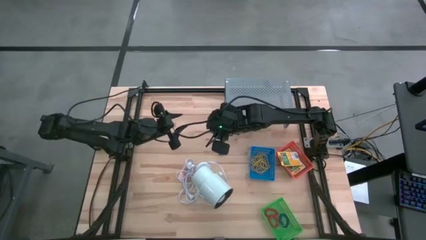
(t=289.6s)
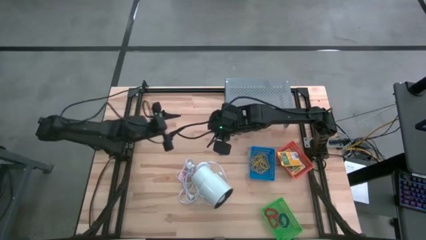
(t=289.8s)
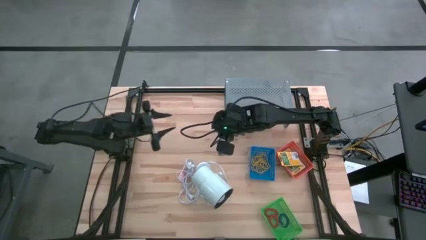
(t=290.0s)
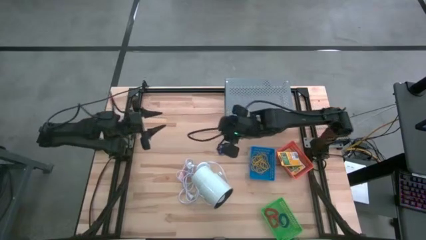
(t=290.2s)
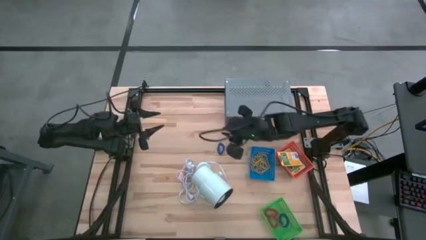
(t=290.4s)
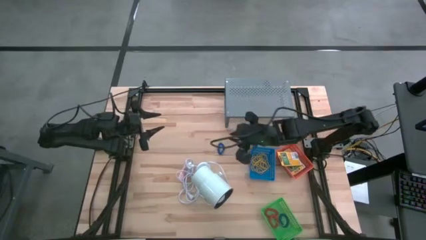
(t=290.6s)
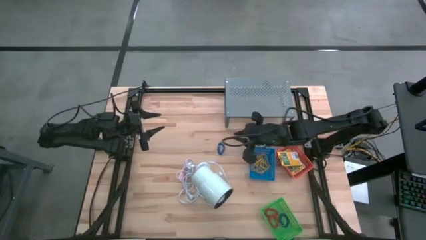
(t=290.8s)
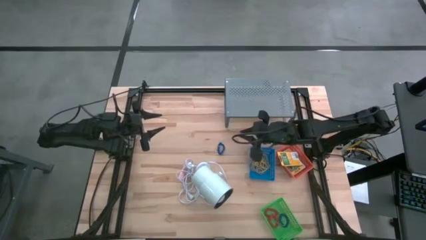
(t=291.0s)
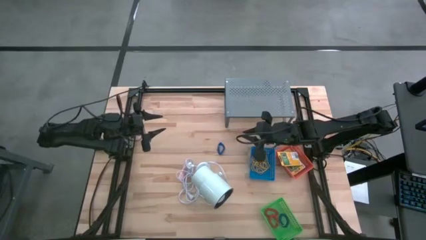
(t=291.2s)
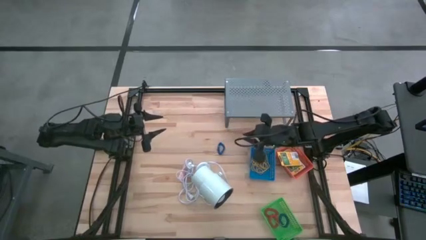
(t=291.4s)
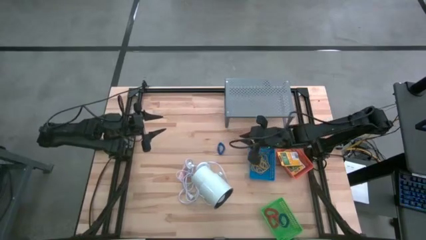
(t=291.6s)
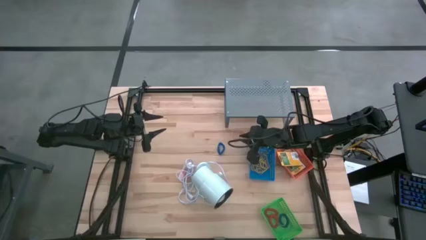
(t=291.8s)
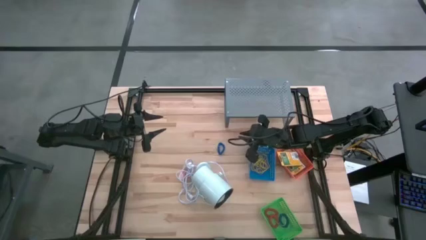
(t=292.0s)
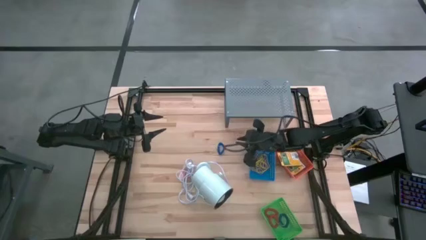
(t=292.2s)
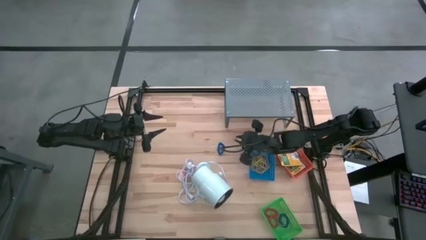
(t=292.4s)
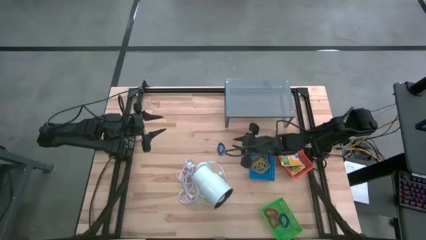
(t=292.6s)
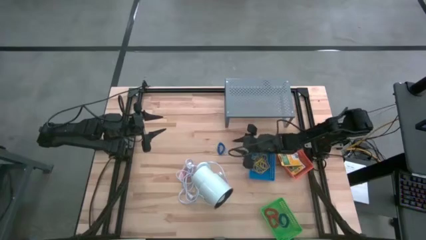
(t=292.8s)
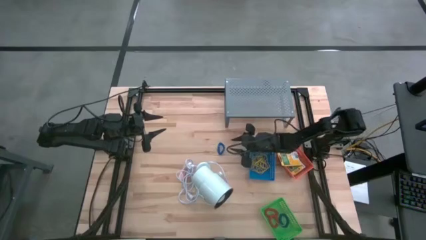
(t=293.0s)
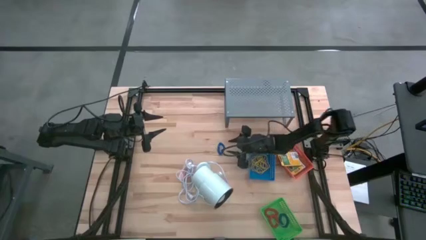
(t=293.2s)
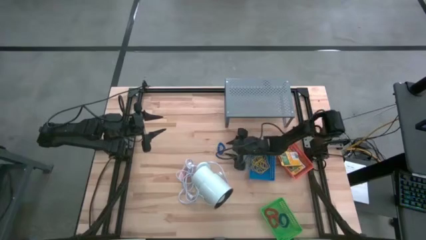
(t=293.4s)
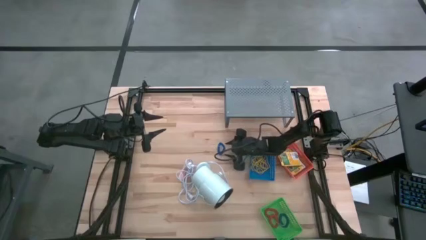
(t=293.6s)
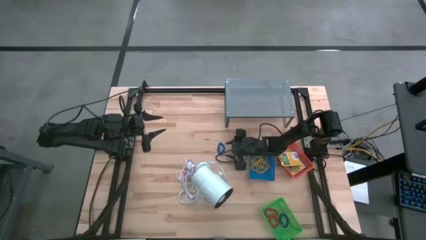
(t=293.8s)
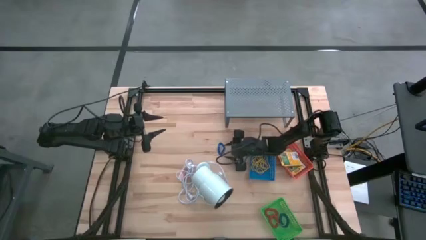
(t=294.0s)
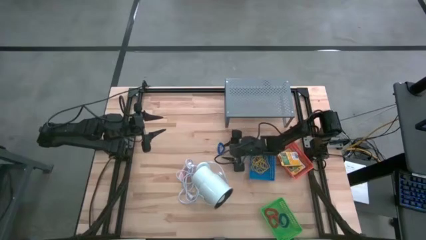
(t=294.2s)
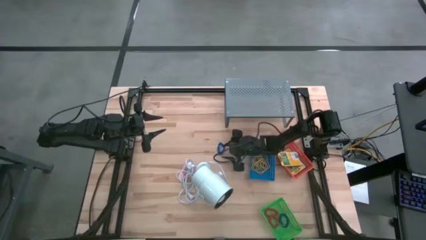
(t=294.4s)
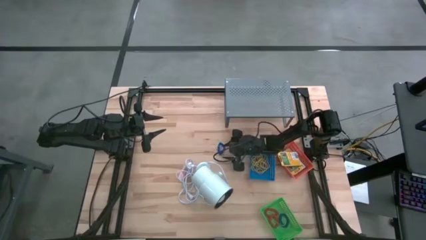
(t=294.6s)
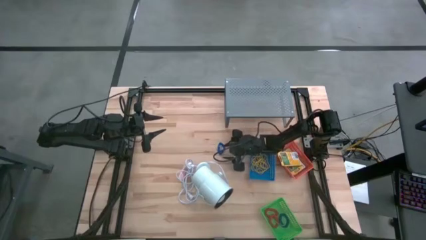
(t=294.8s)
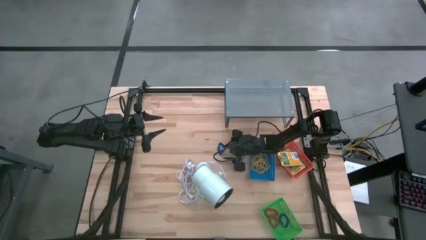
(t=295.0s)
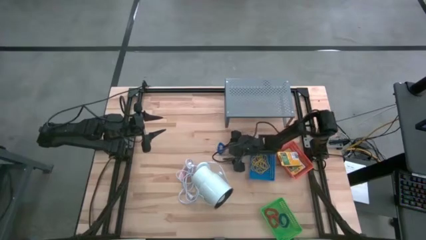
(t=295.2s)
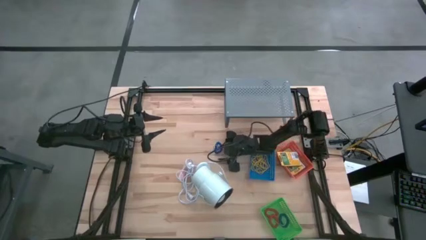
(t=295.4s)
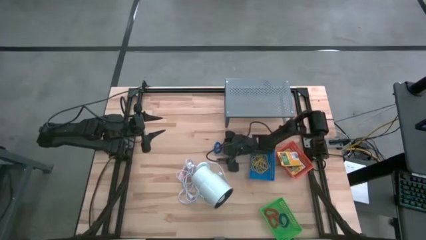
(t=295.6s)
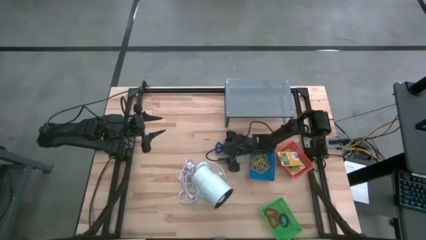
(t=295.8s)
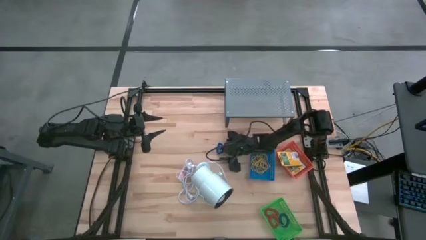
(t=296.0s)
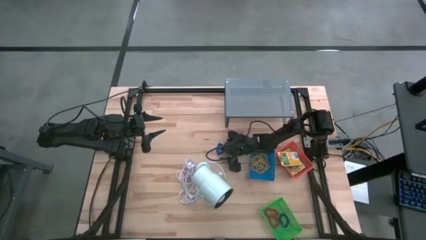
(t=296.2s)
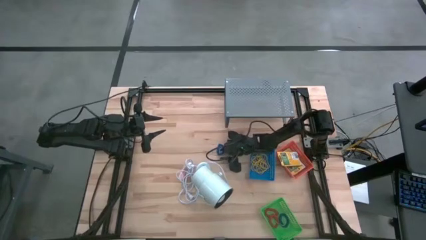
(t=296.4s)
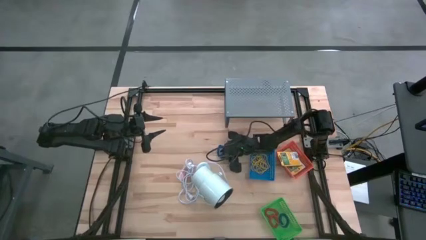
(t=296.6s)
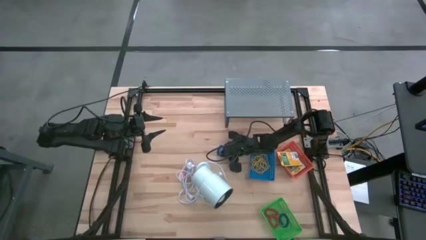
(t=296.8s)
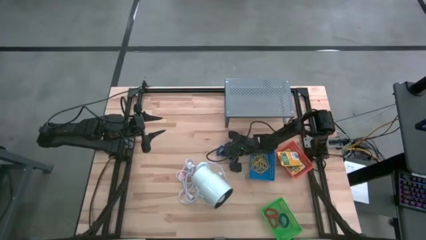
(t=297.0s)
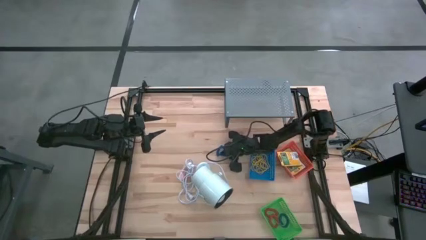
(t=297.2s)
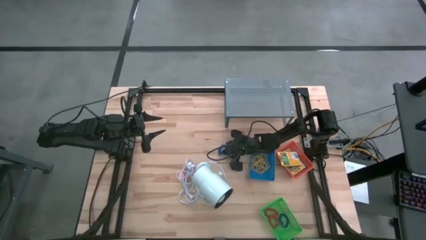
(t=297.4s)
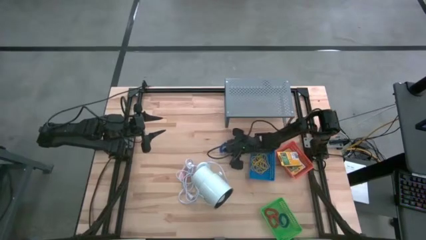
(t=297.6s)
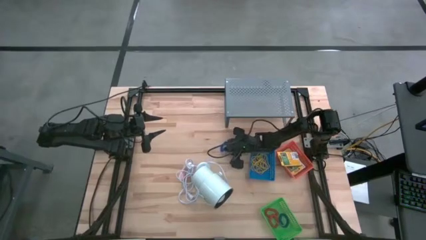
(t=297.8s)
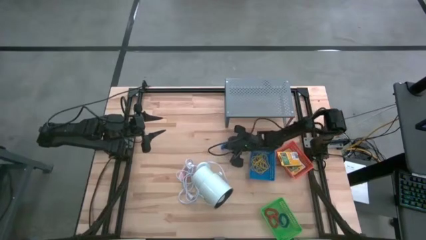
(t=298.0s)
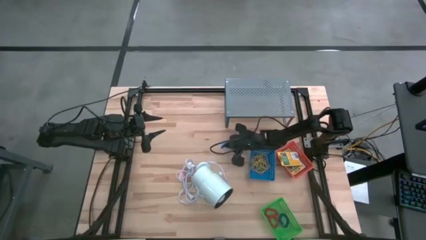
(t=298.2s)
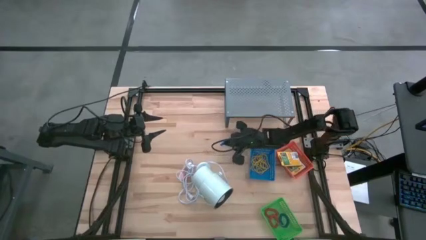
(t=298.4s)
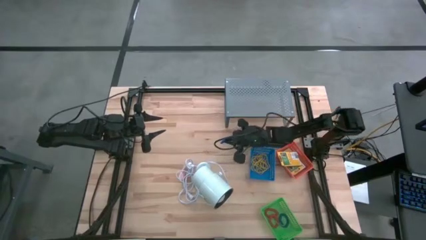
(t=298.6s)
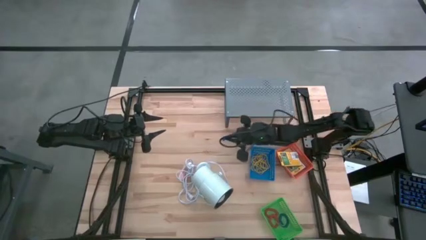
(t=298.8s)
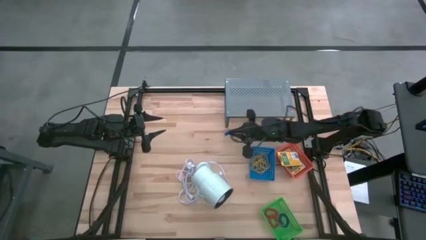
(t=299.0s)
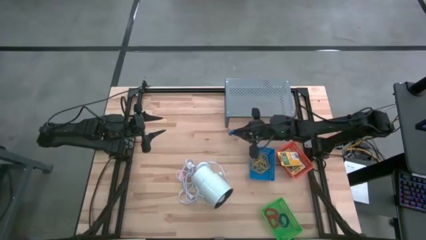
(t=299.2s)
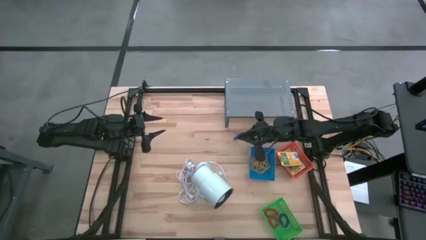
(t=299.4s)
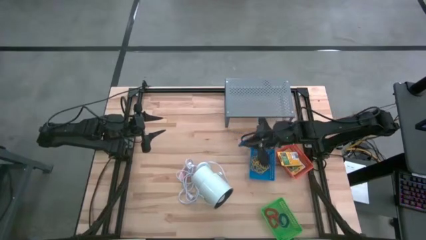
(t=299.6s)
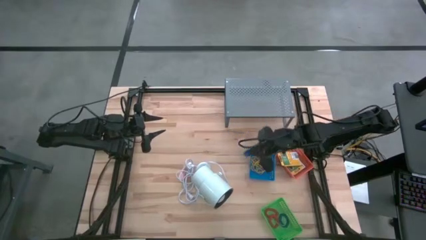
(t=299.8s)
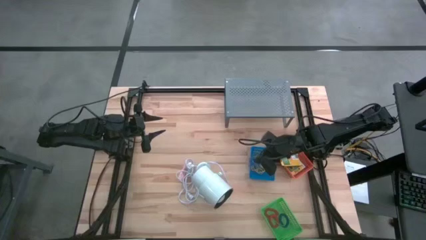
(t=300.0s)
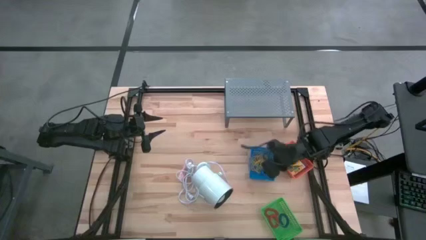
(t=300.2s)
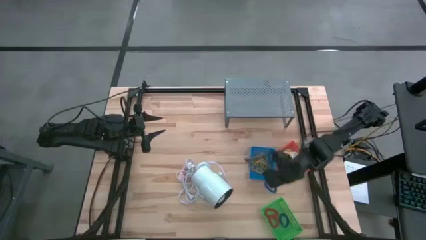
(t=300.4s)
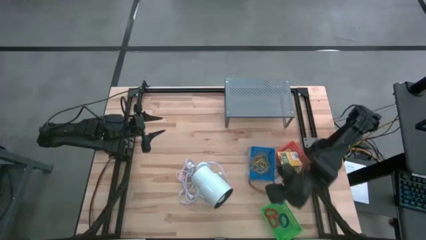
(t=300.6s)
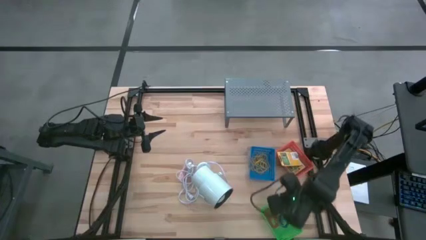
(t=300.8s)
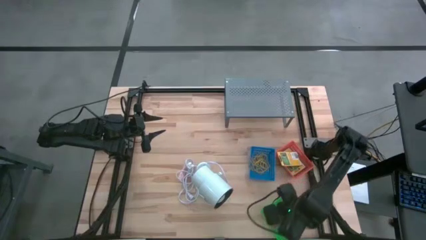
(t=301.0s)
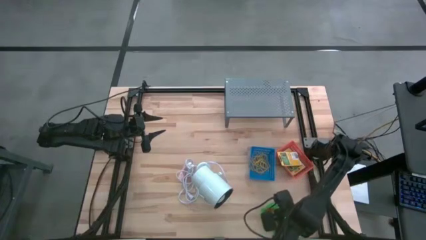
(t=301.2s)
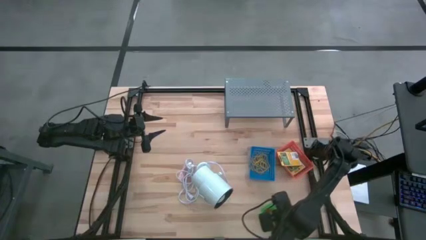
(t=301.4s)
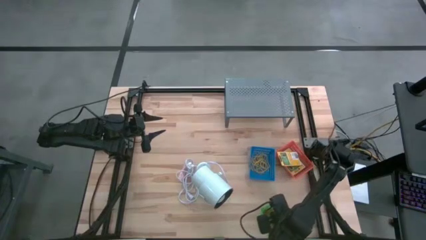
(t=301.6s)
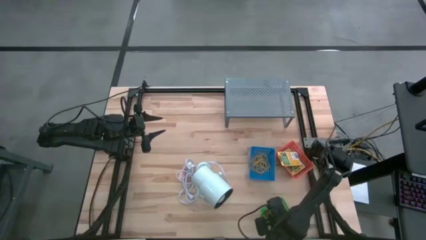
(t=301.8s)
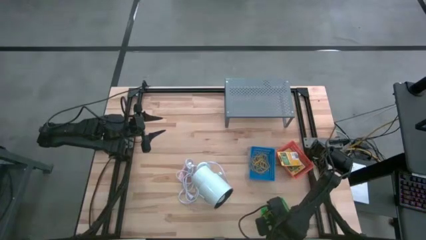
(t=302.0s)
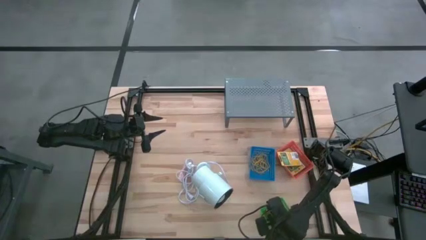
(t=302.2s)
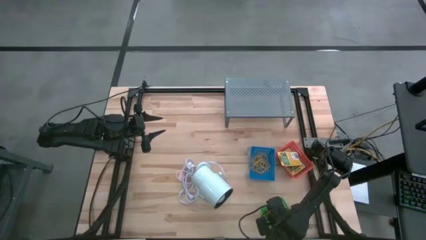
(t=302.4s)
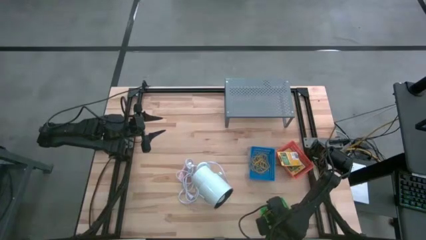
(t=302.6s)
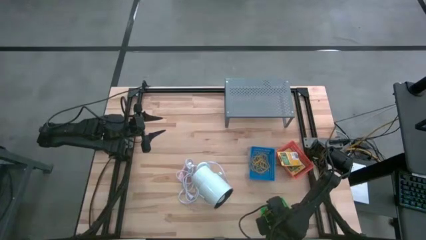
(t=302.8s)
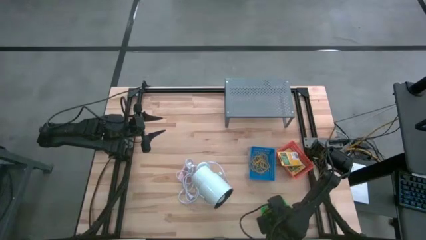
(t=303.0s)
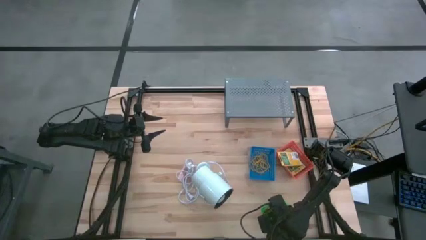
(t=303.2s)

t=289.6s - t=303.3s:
Task: Pick & Place Office Desk Supplies
Put the blue spring keychain into the green bin
